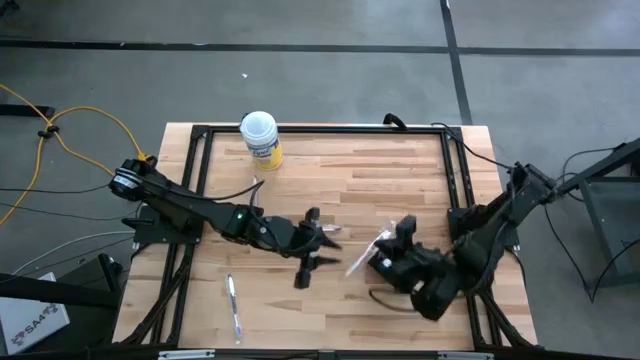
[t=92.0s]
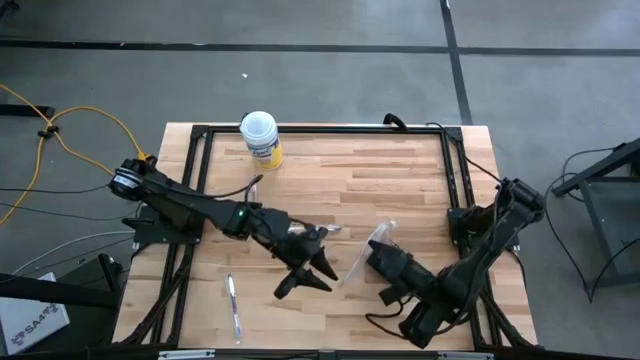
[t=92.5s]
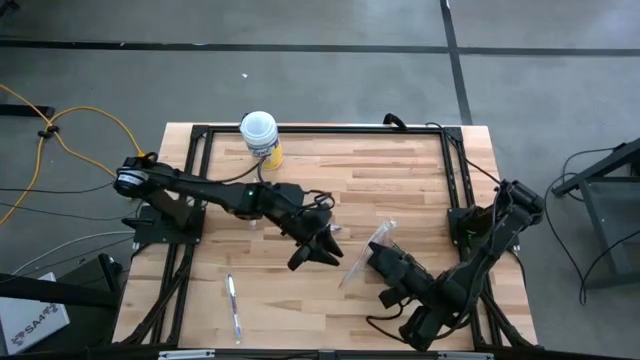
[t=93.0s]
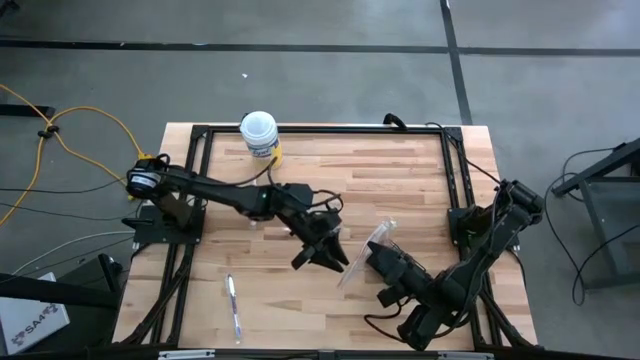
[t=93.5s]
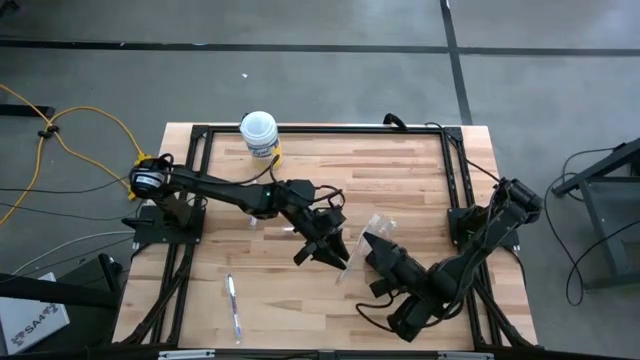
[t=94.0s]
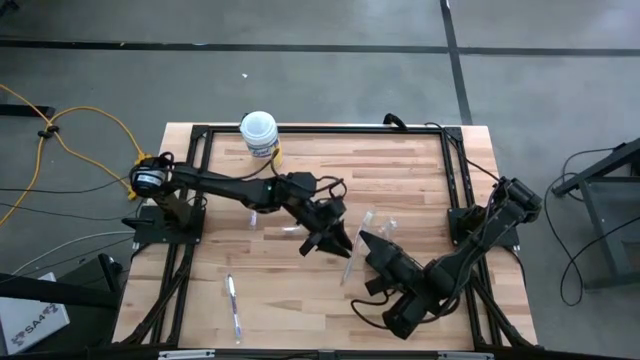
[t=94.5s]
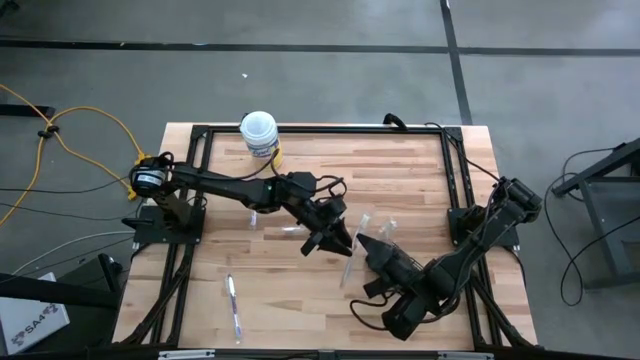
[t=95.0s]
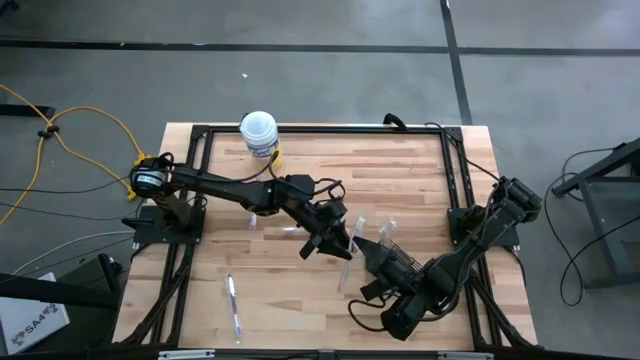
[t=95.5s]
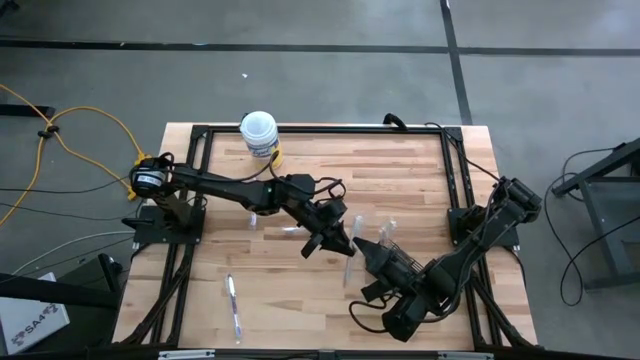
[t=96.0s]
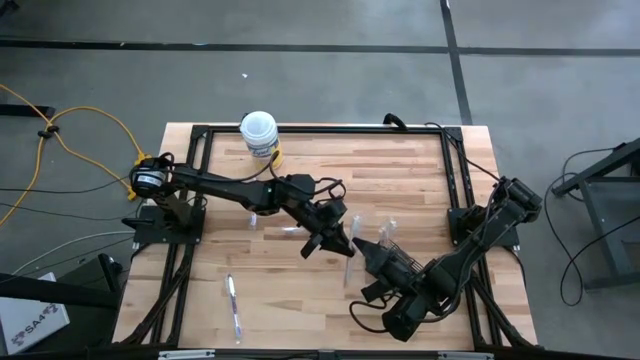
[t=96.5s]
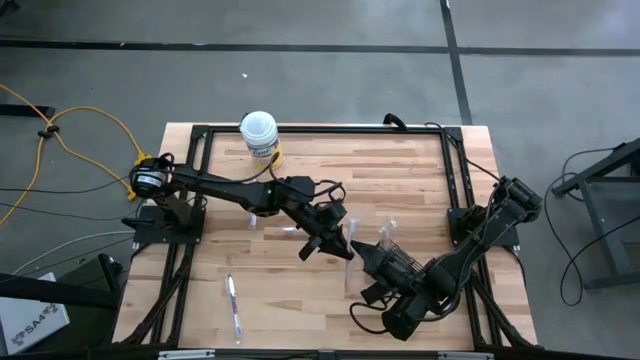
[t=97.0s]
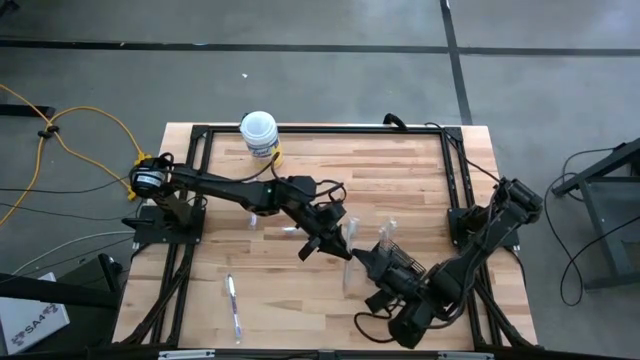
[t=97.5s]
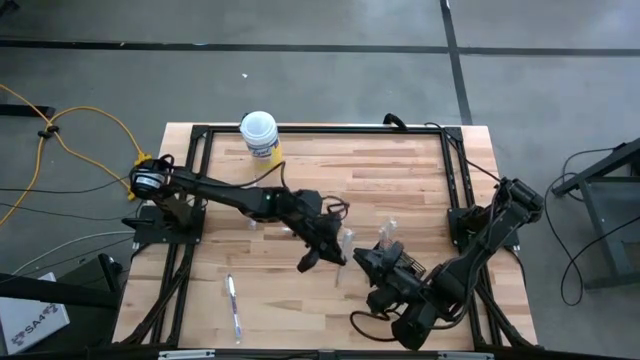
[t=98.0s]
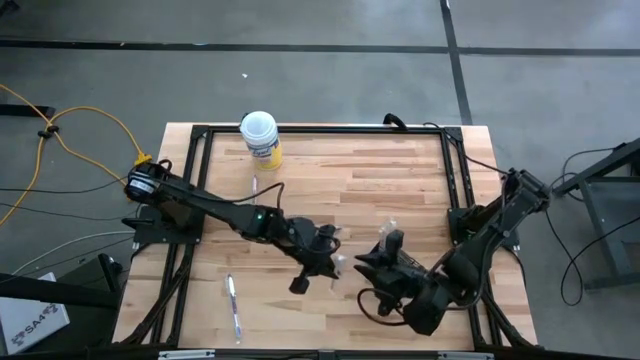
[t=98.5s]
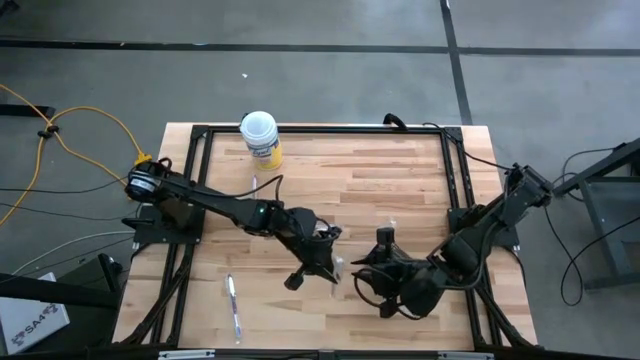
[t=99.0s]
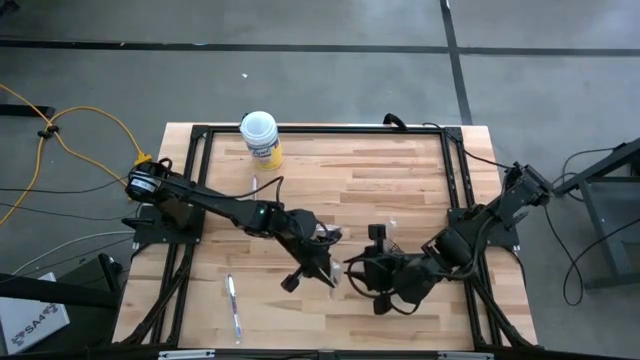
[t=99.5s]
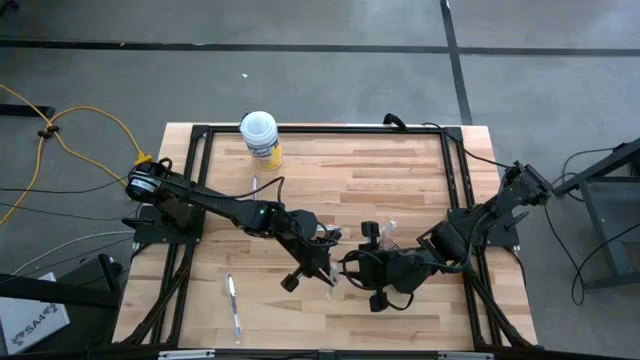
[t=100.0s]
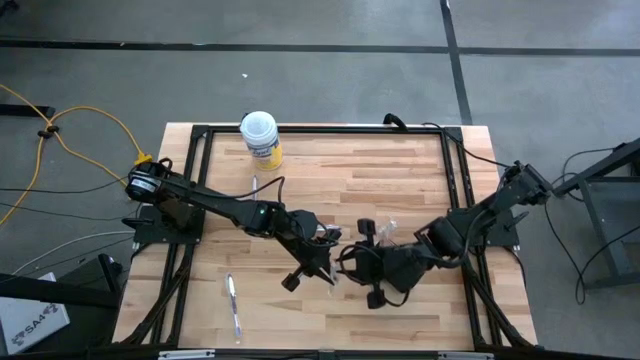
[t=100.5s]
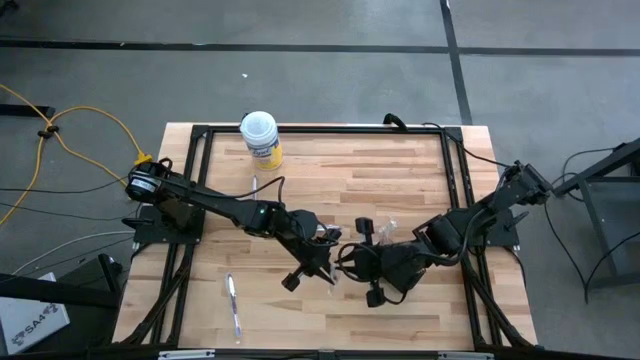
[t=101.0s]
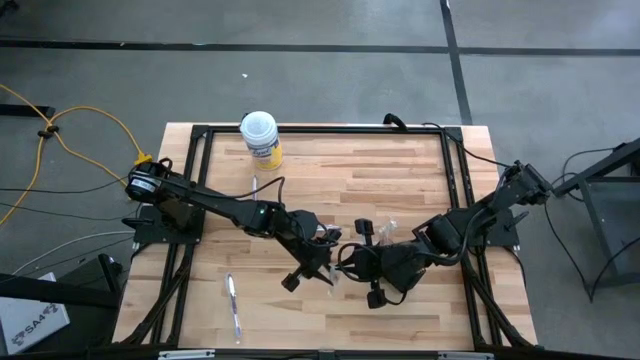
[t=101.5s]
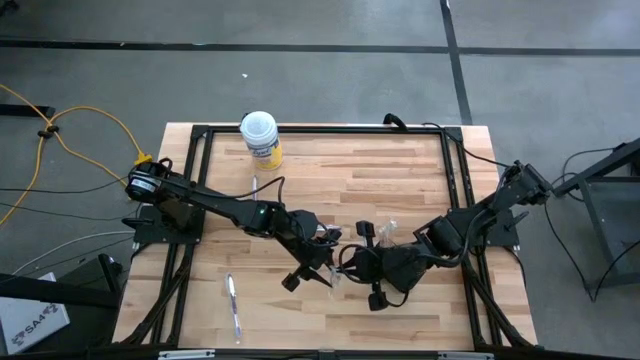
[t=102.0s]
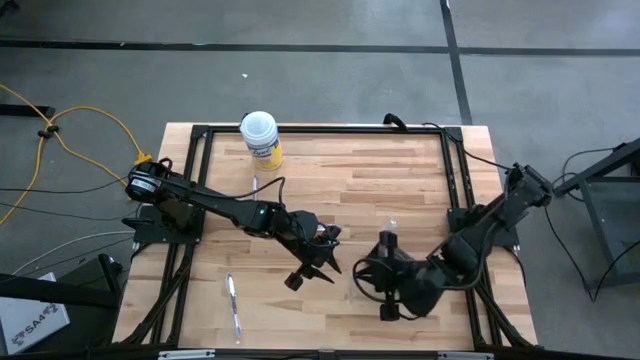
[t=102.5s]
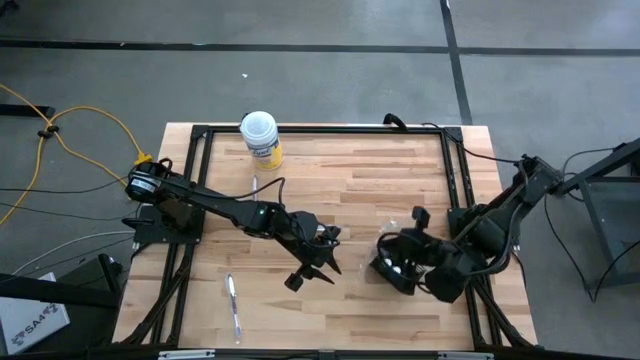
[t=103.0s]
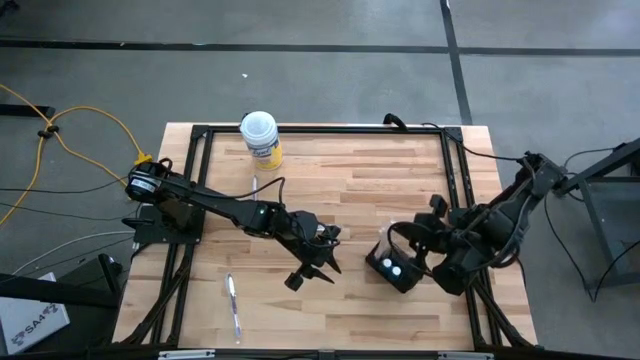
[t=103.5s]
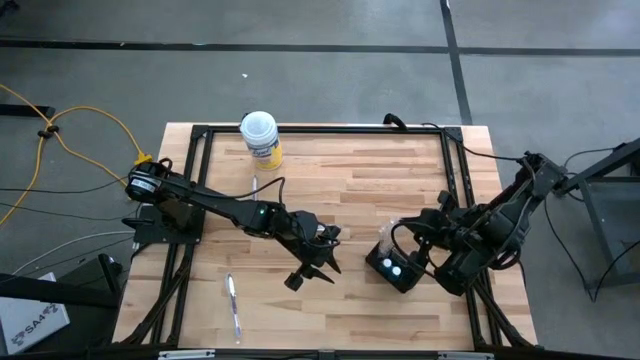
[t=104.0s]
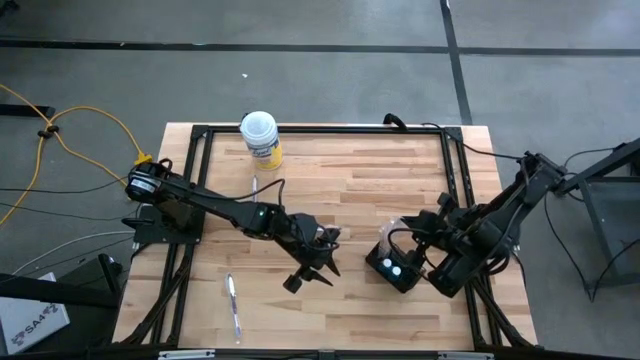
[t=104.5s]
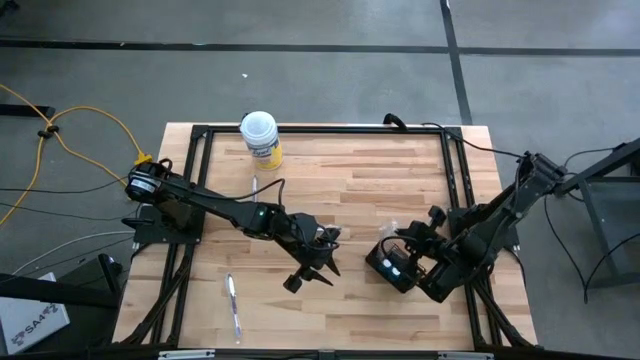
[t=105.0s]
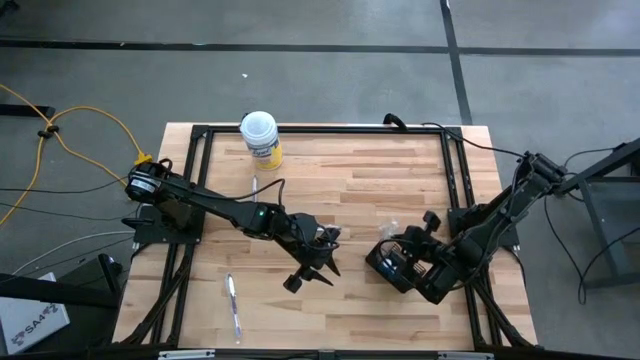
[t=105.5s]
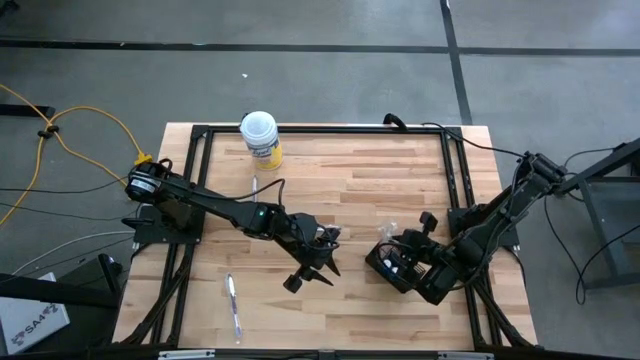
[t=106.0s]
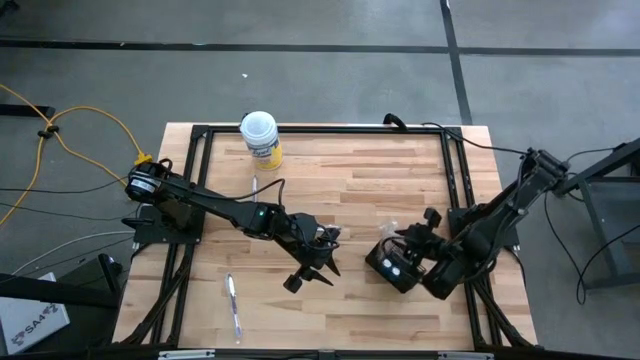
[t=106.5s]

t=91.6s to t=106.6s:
Task: Pick & Place toothbrushing station
Put the orange toothbrush into the wire organizer
